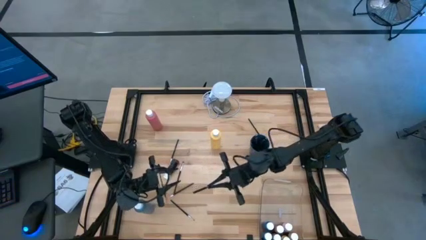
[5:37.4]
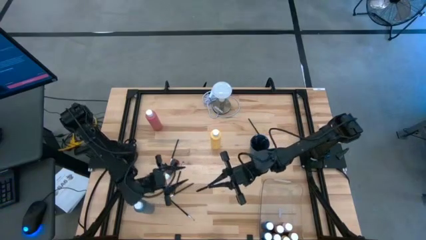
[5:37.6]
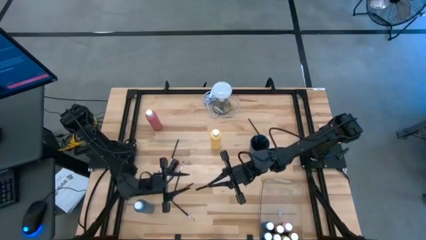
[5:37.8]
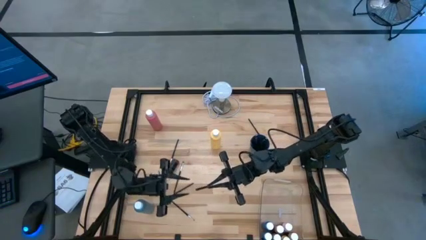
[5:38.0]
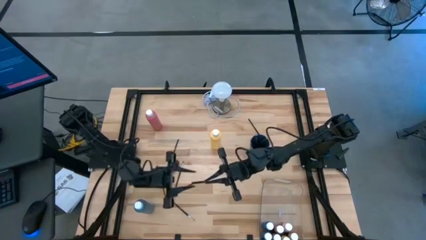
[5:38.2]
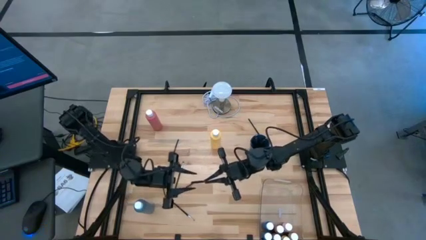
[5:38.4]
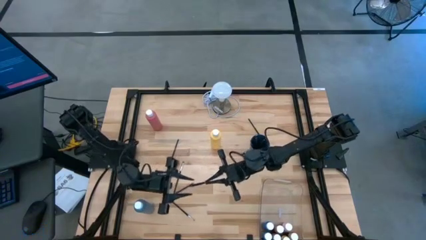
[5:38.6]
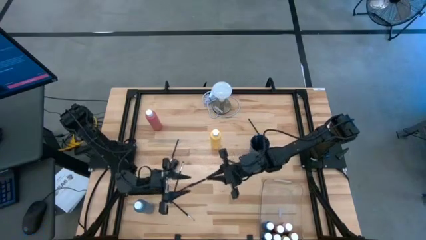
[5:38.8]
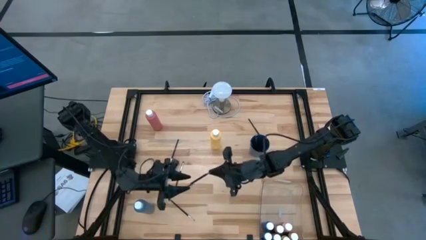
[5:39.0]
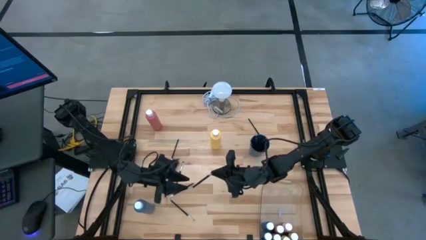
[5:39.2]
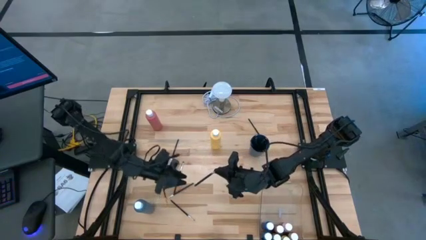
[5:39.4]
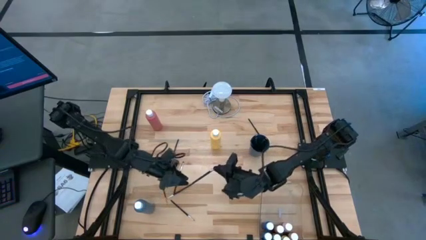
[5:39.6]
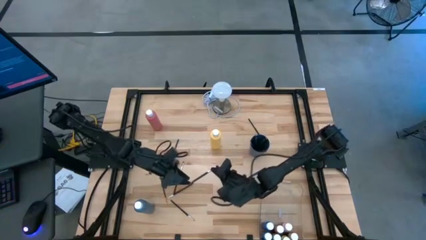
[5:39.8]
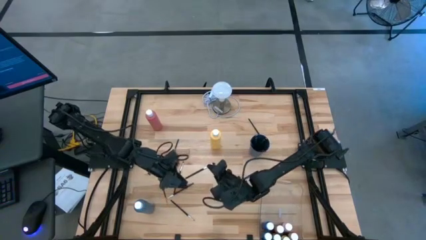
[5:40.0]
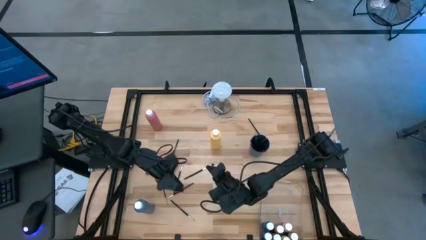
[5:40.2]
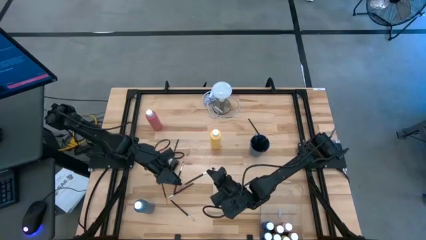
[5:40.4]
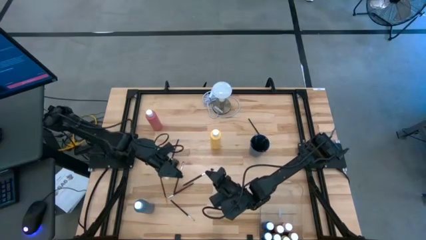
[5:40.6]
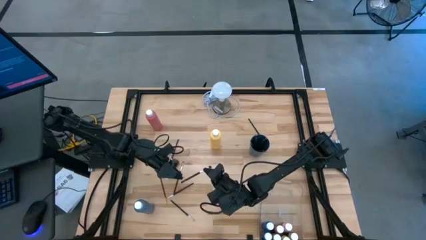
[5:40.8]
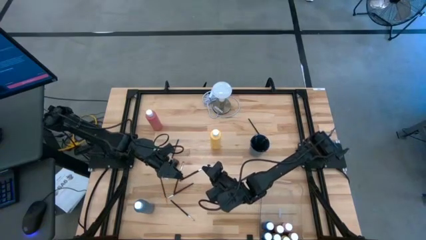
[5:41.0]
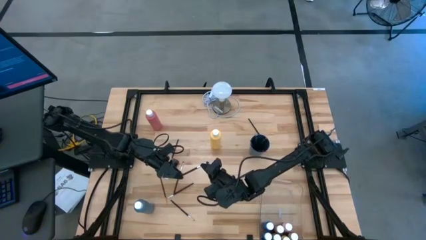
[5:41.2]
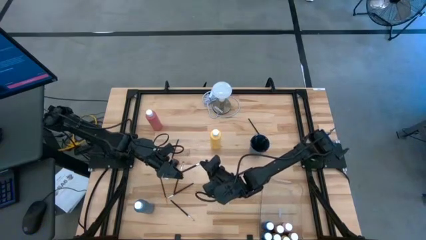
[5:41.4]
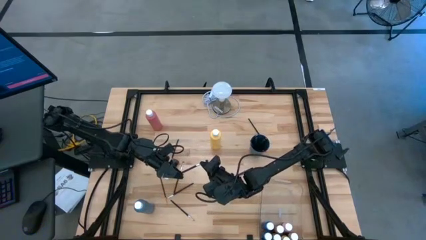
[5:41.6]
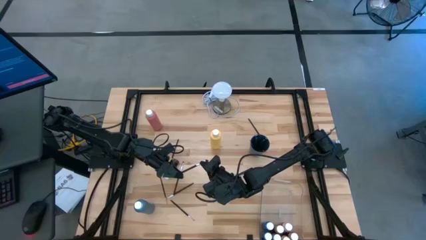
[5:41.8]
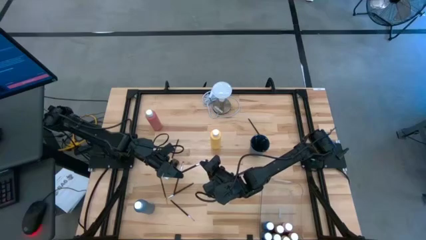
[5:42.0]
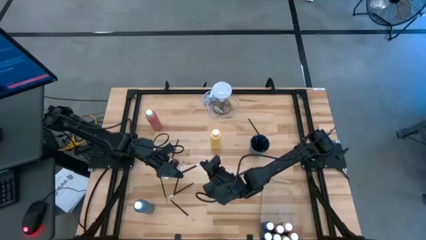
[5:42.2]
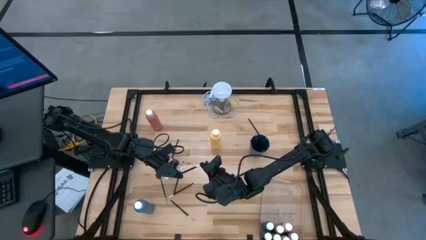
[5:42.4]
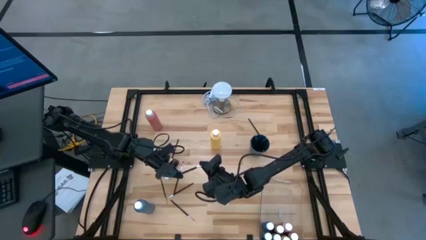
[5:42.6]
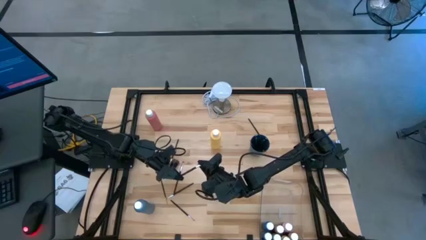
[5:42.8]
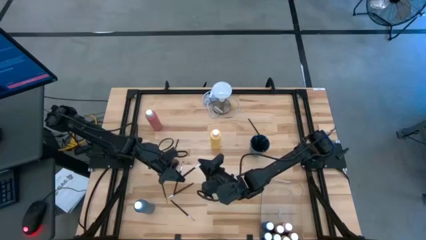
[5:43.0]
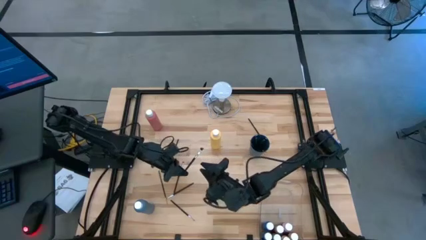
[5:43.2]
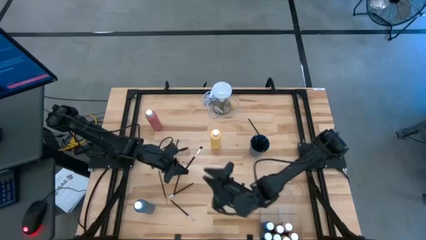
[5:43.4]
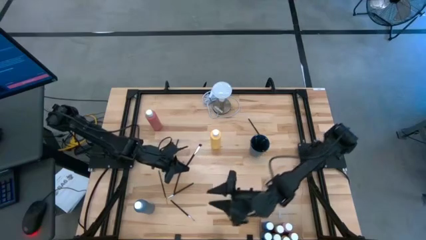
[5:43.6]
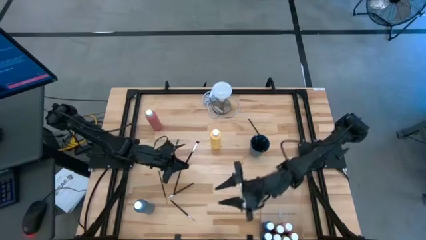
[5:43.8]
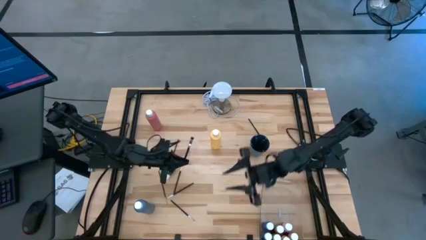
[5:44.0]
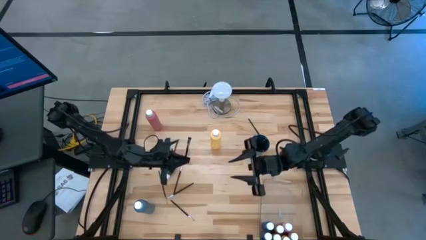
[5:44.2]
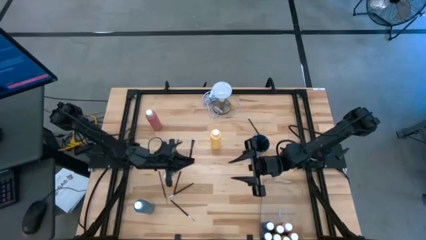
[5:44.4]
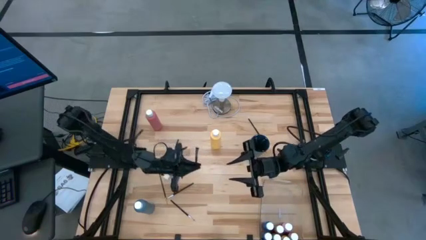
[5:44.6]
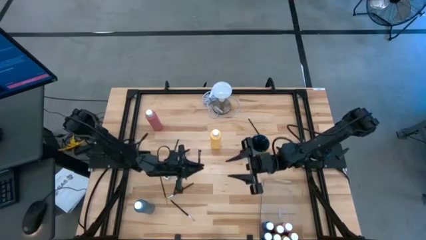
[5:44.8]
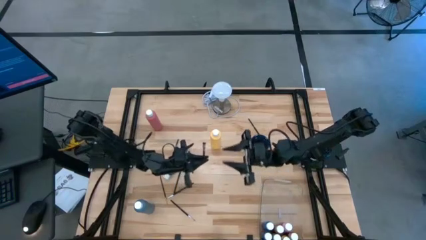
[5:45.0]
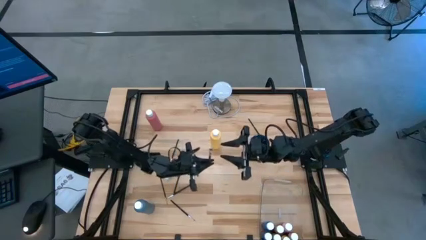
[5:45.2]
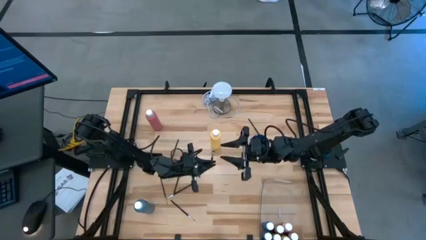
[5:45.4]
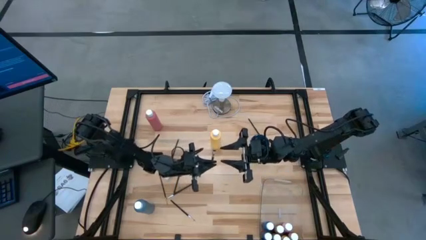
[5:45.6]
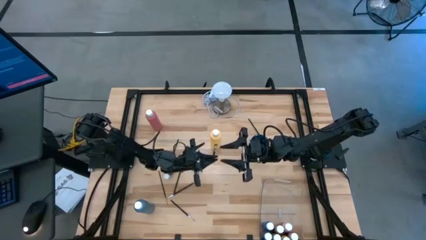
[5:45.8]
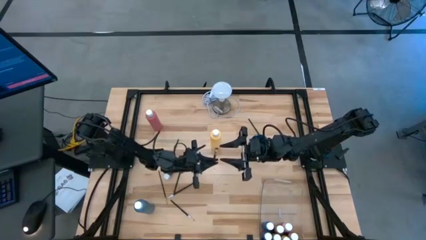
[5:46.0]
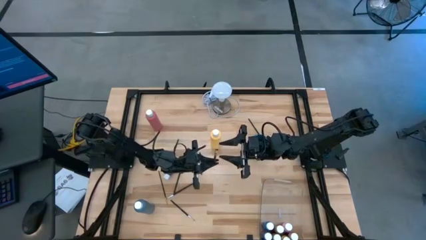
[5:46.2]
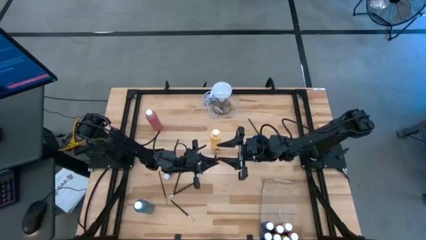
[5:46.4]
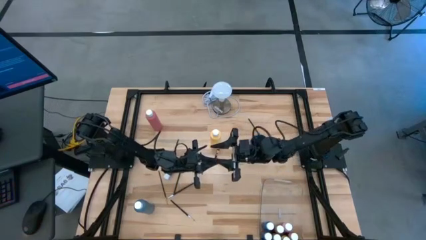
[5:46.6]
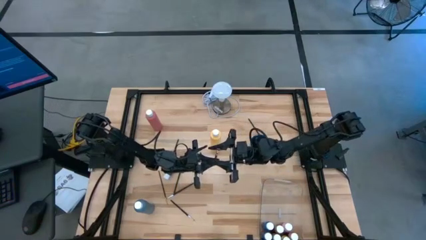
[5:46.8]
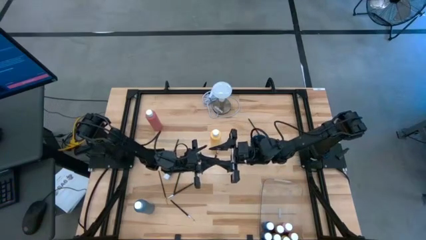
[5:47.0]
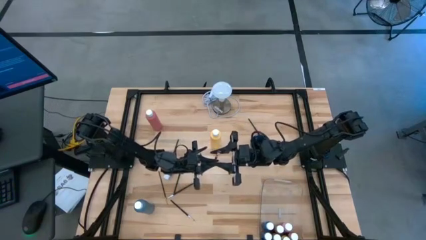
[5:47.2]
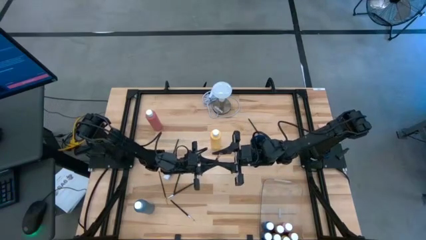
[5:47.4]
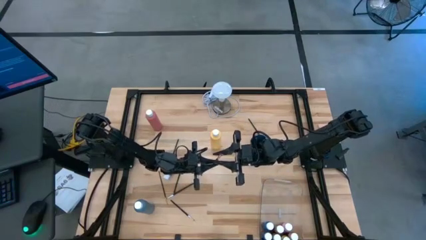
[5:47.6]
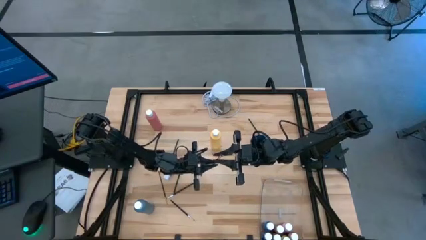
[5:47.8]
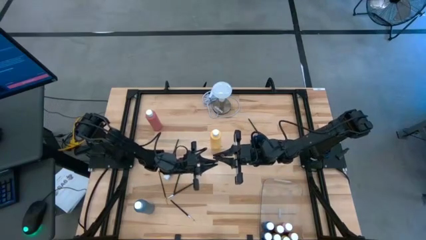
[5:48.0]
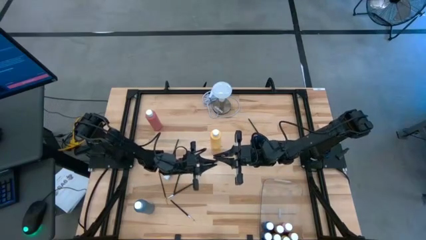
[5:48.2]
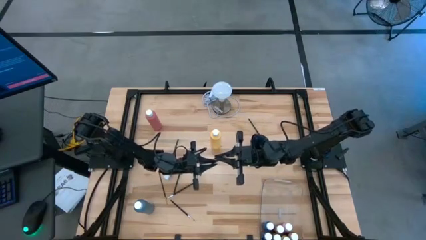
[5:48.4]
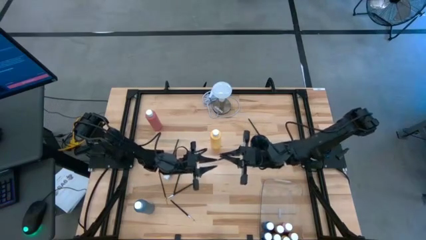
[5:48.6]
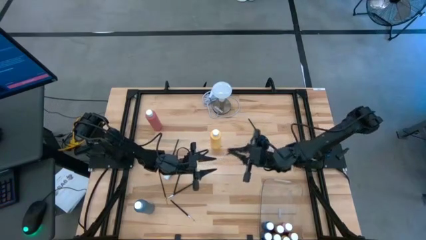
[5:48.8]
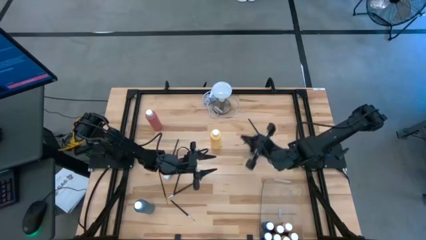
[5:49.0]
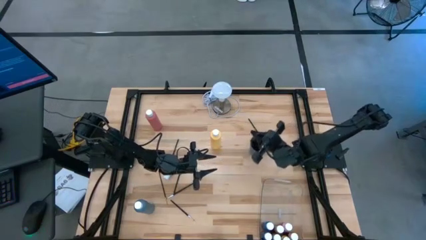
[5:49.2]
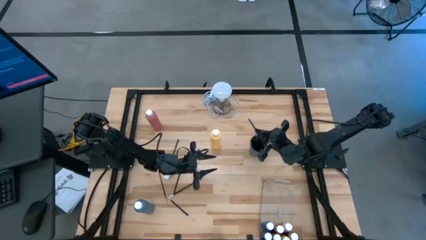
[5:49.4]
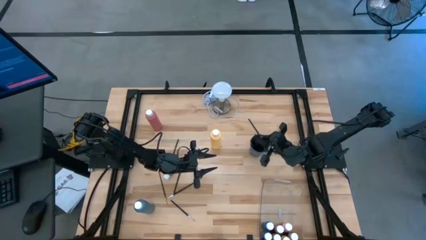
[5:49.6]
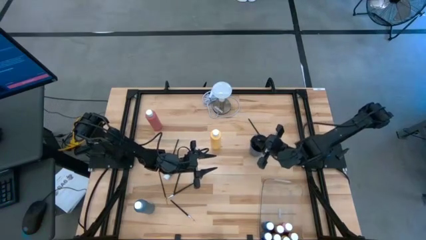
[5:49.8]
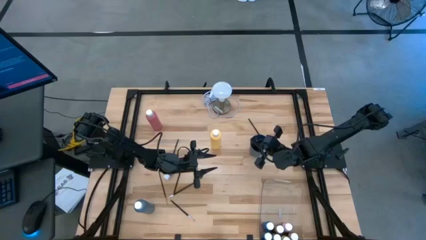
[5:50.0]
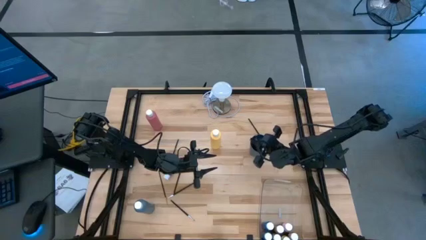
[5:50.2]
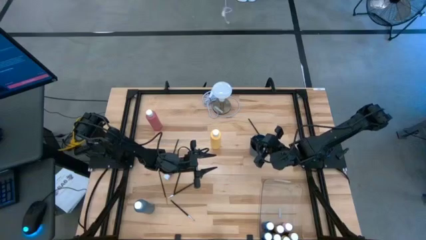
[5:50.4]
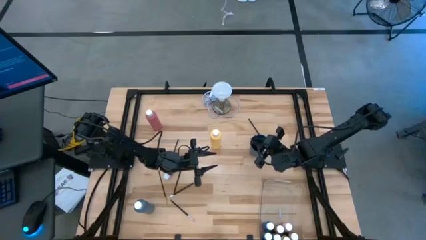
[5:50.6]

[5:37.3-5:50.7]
Task: Pick & Place Paint Supplies
Put the black silver paintbrush into the blue cup
